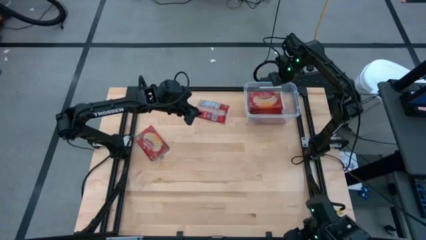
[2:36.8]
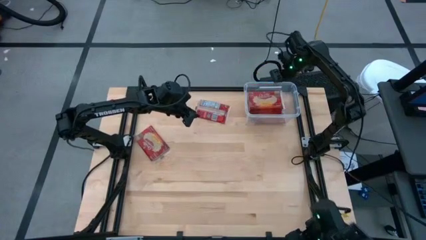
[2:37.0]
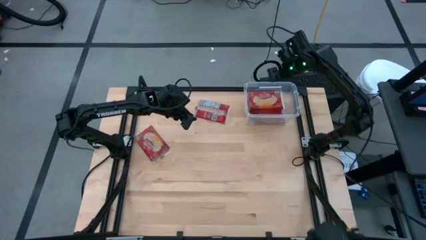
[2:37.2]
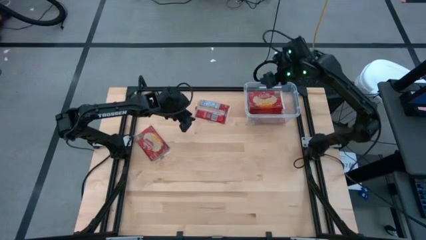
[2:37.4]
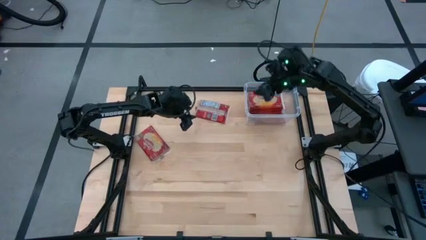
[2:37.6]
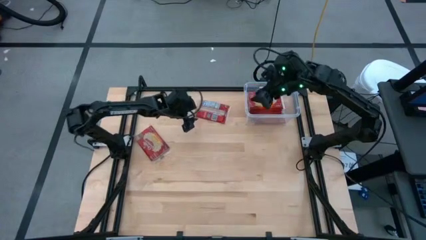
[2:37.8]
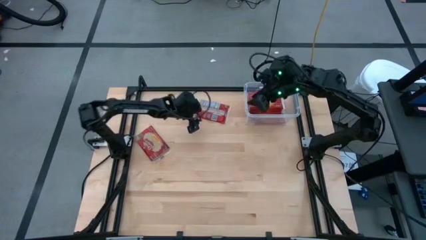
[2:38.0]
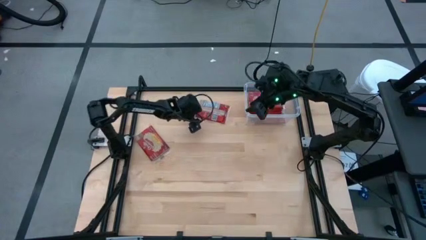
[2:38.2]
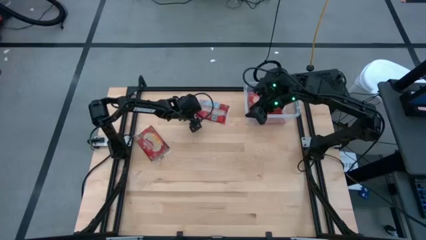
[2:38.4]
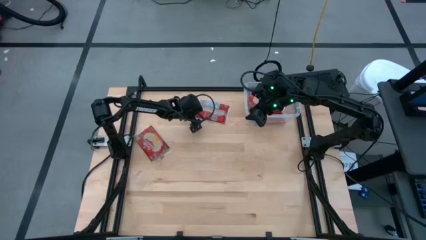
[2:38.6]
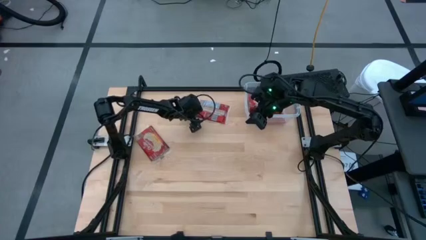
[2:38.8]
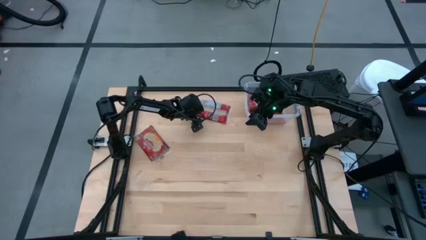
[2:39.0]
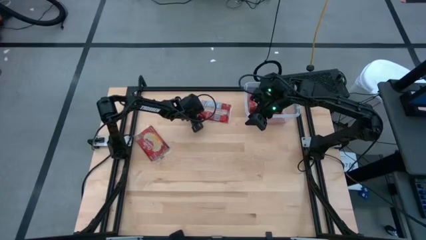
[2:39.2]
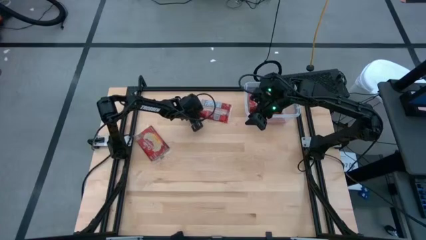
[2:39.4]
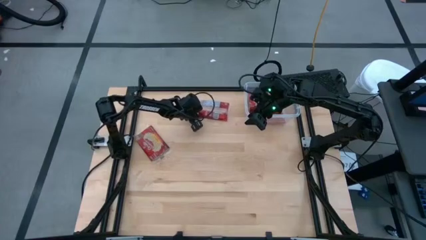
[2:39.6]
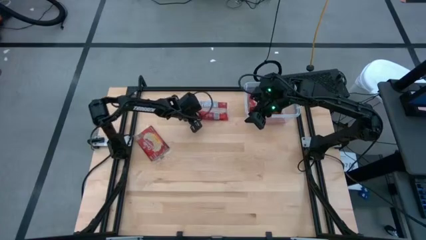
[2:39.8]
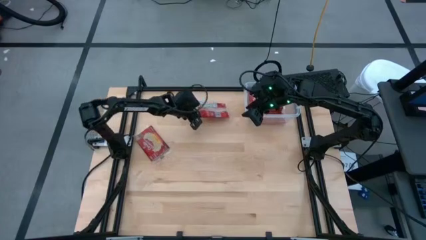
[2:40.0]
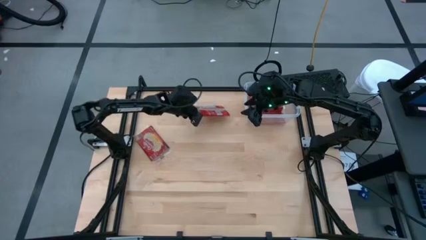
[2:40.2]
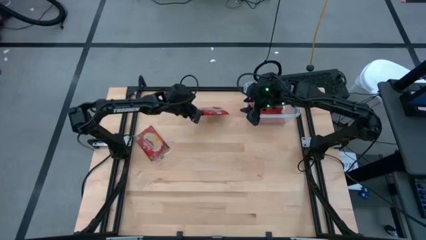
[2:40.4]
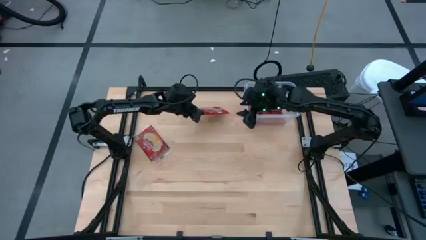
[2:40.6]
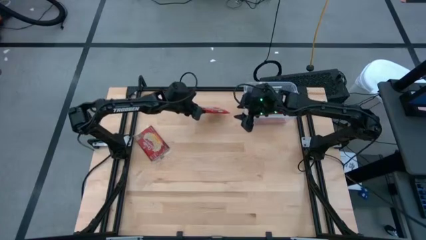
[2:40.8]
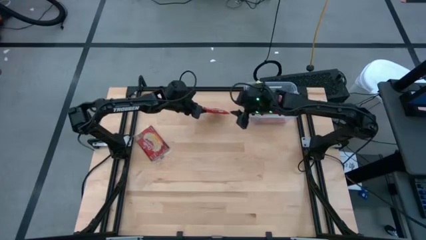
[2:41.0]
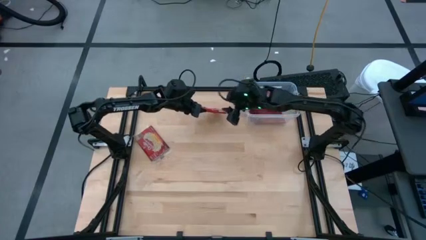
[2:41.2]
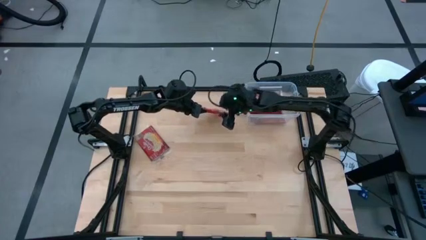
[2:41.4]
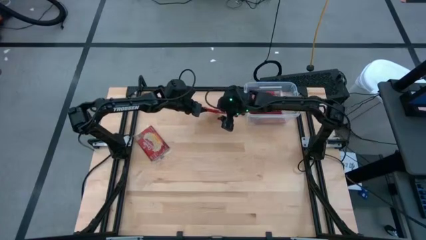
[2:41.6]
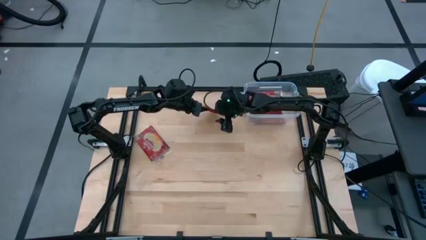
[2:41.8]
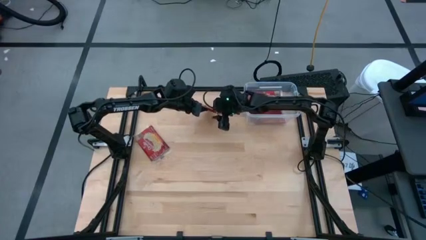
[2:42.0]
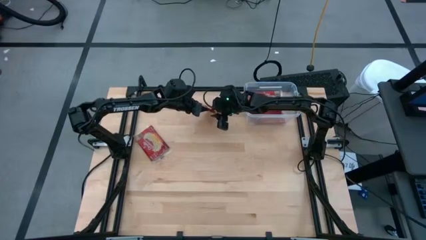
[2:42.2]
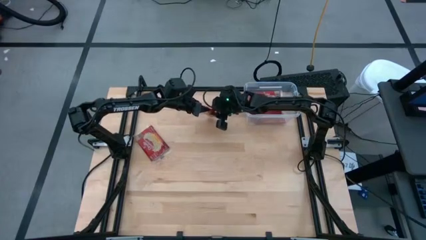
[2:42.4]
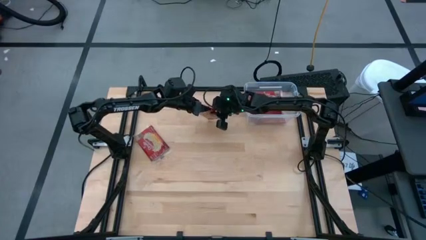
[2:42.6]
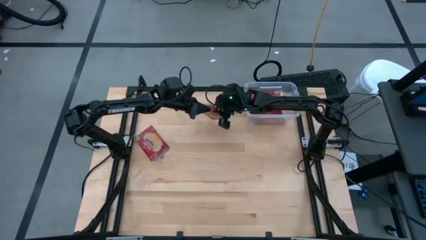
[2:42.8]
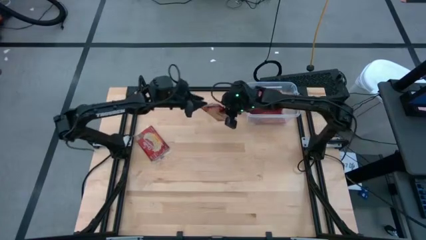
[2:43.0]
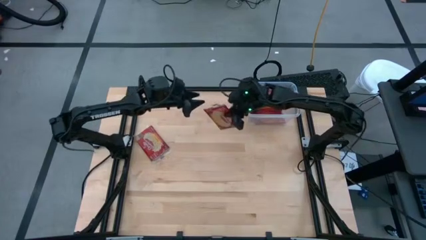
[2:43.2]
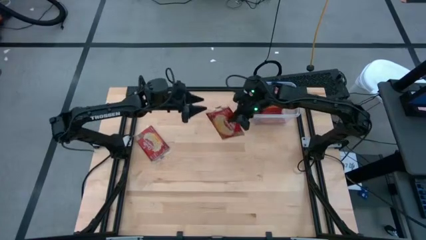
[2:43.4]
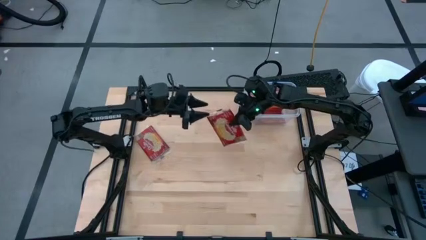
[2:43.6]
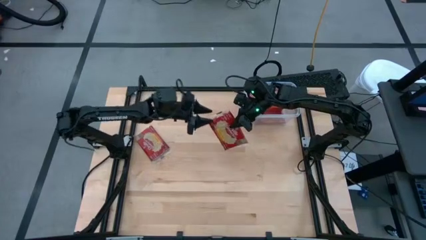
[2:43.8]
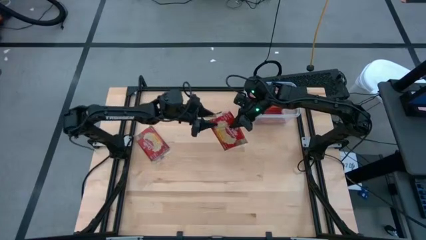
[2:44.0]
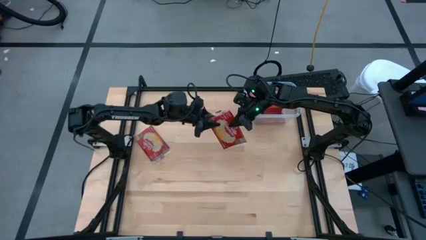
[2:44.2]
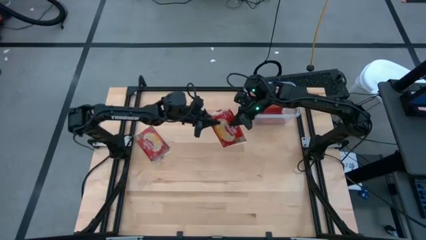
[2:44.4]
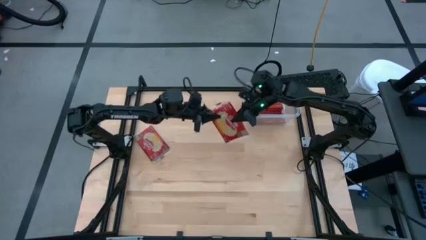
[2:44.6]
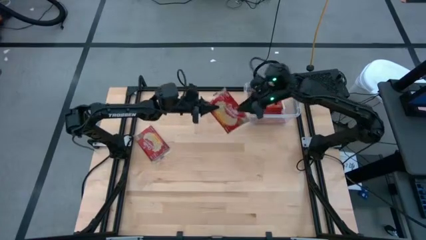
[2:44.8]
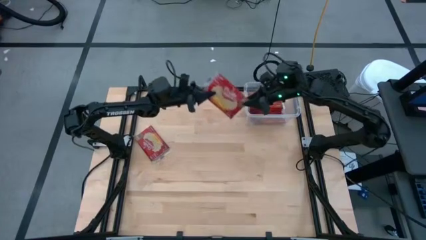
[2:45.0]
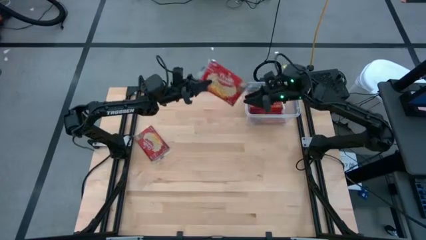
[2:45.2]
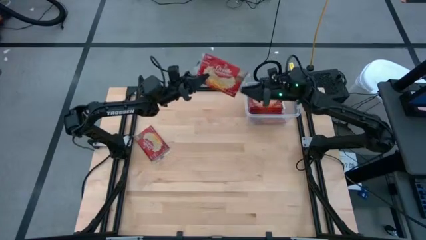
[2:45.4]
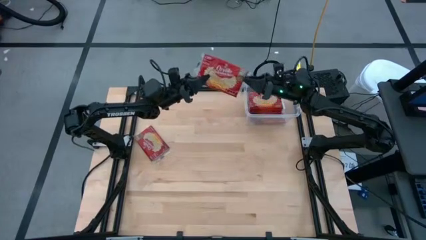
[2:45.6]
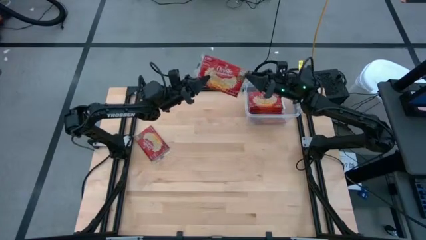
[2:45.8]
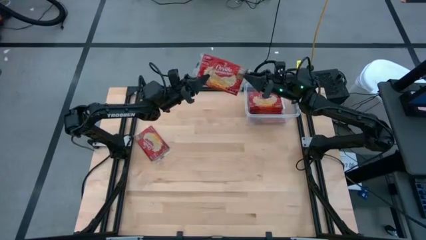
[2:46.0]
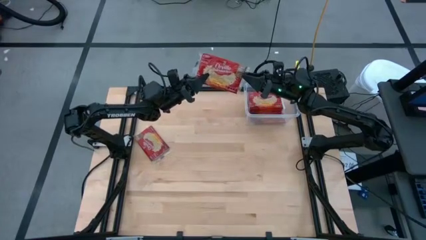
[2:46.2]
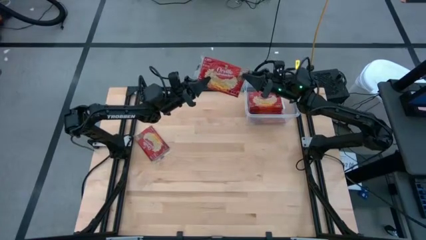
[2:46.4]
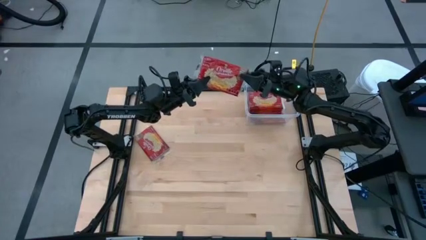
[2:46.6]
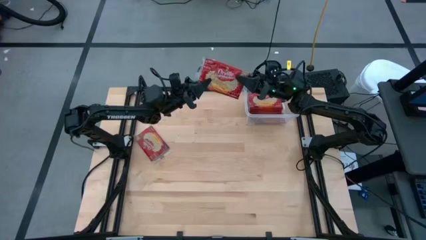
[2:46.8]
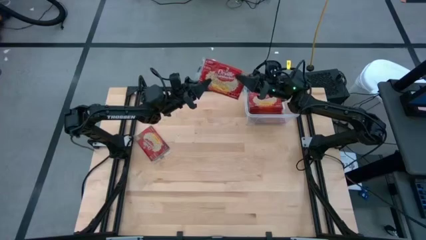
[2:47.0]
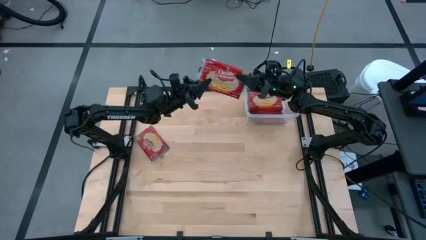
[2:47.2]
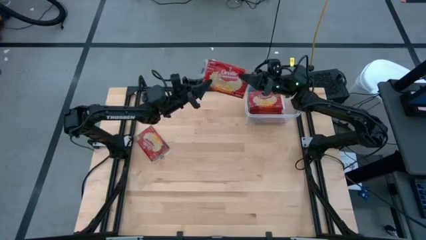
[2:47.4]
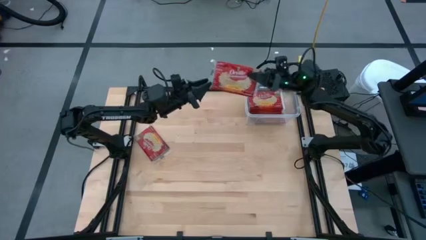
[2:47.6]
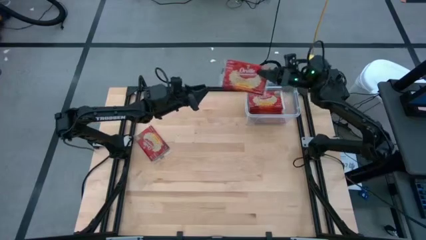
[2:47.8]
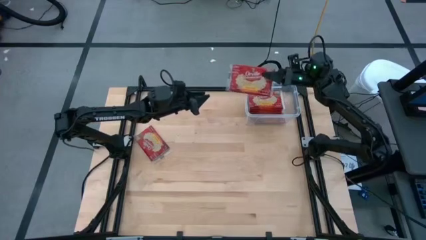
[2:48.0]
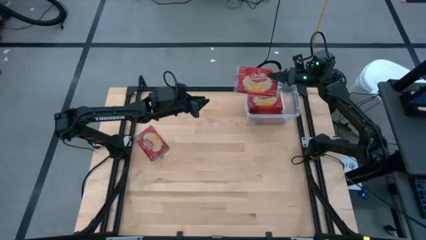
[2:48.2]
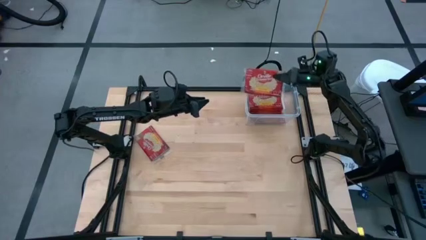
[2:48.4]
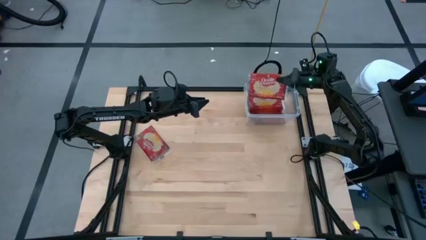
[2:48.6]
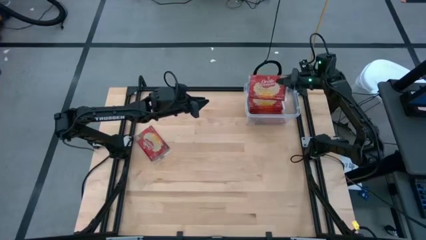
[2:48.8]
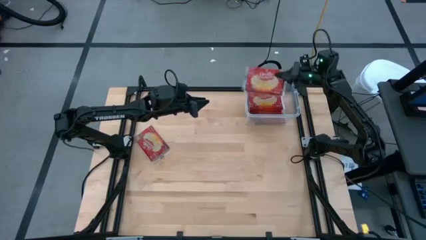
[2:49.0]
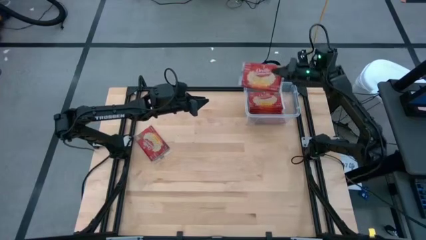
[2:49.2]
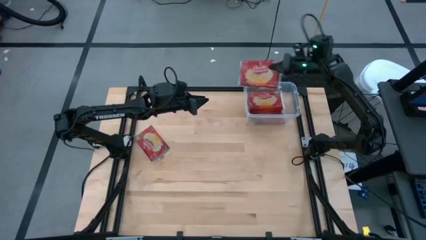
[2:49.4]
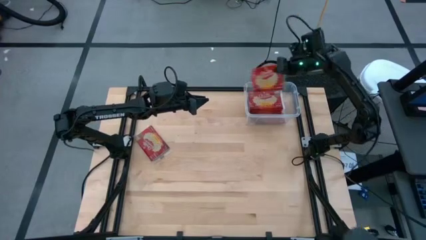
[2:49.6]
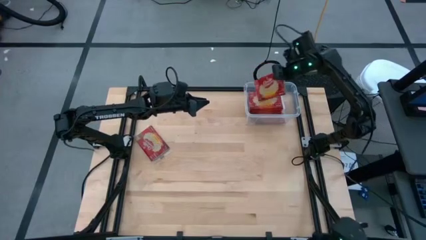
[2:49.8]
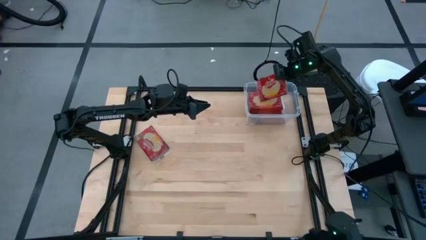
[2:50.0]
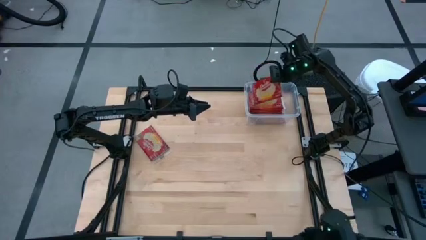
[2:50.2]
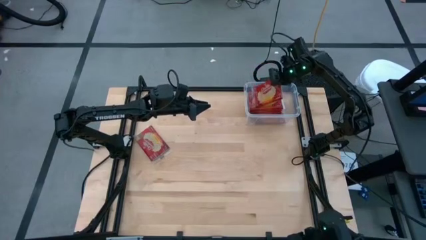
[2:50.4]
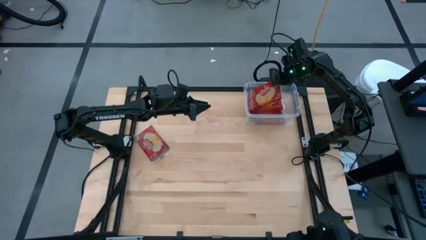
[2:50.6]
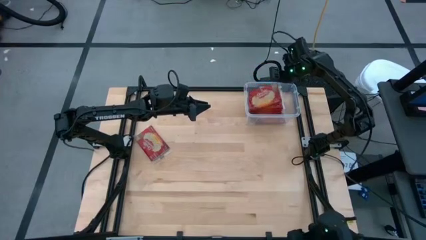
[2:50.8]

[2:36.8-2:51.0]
Task: Sort popcorn bags into baskets
Put the popcorn bag into the transparent container
